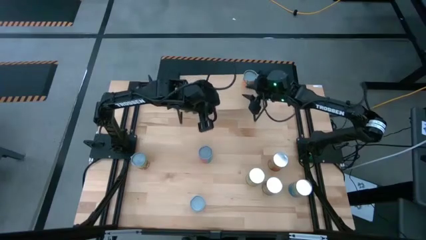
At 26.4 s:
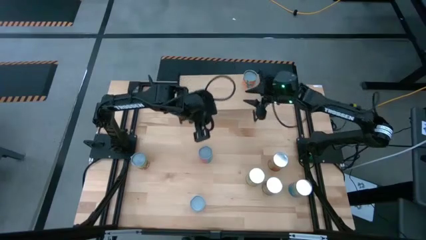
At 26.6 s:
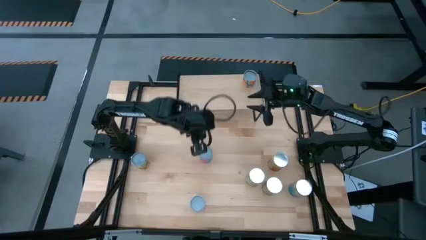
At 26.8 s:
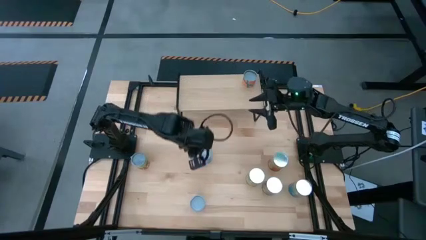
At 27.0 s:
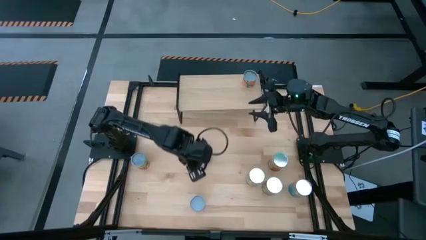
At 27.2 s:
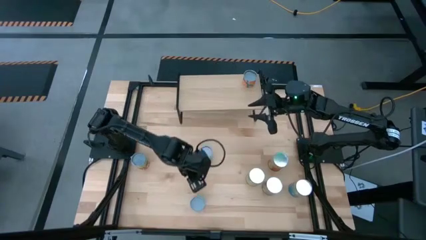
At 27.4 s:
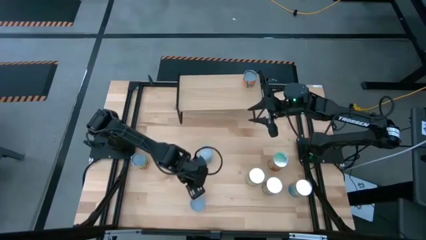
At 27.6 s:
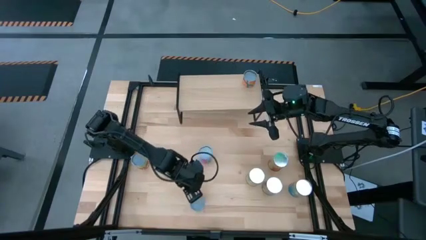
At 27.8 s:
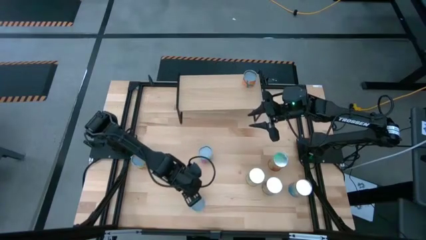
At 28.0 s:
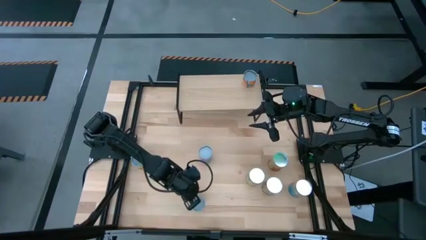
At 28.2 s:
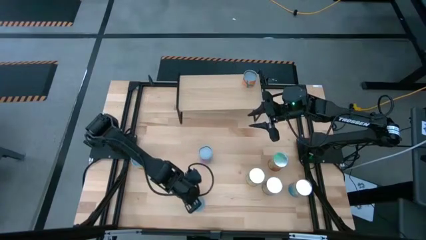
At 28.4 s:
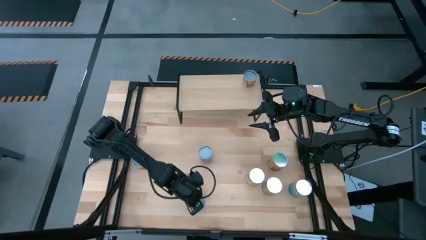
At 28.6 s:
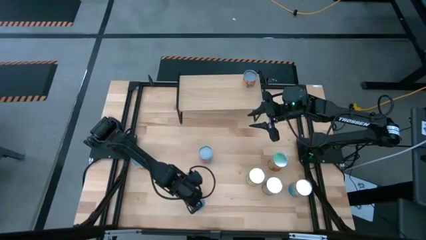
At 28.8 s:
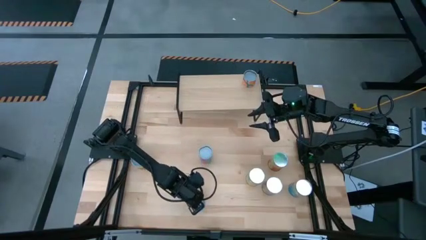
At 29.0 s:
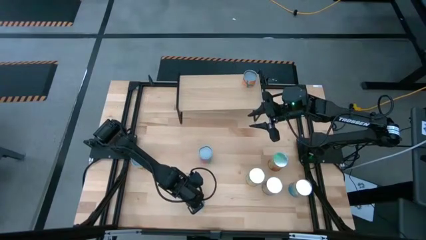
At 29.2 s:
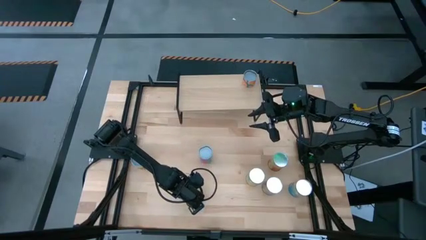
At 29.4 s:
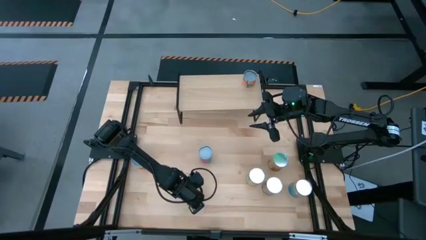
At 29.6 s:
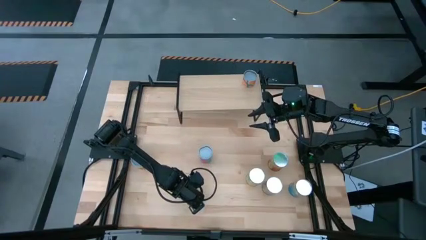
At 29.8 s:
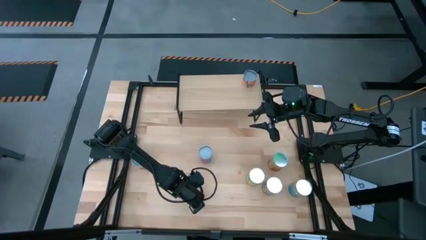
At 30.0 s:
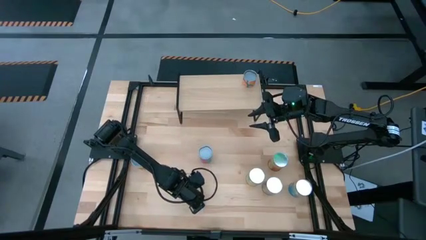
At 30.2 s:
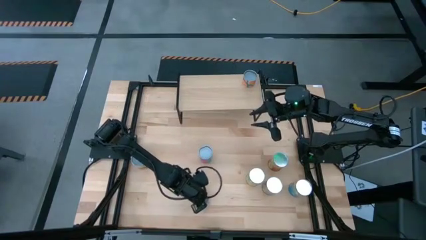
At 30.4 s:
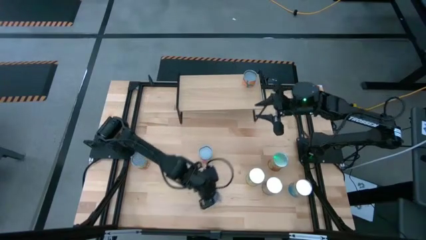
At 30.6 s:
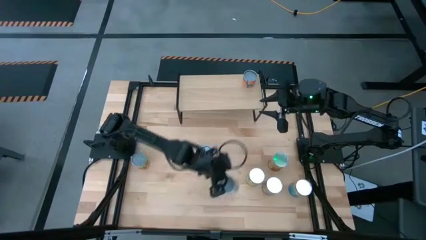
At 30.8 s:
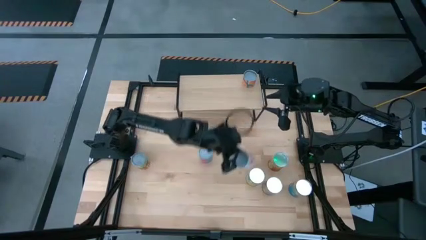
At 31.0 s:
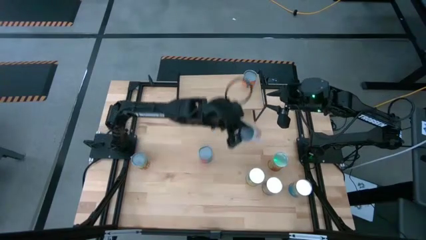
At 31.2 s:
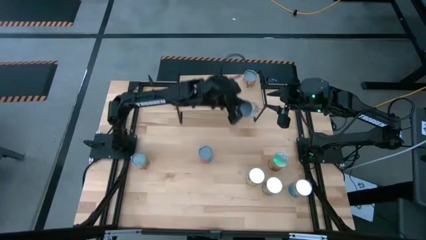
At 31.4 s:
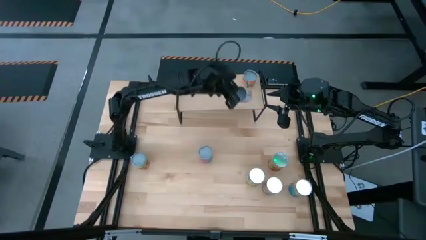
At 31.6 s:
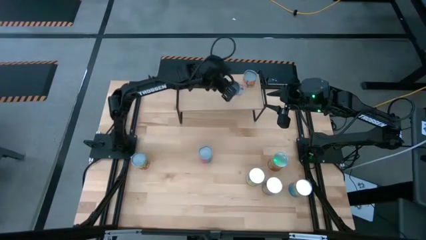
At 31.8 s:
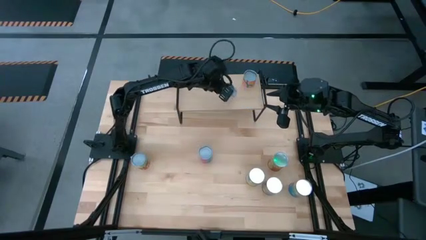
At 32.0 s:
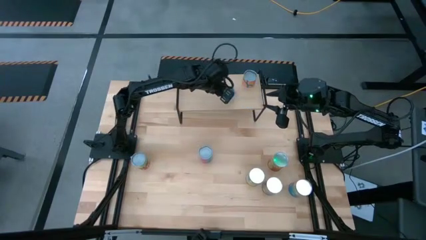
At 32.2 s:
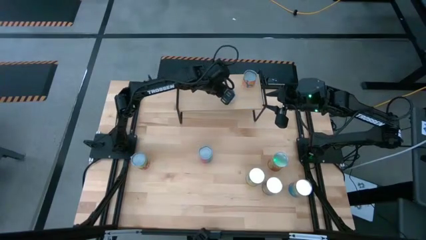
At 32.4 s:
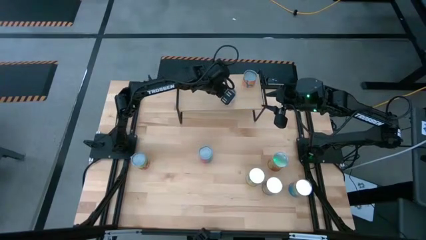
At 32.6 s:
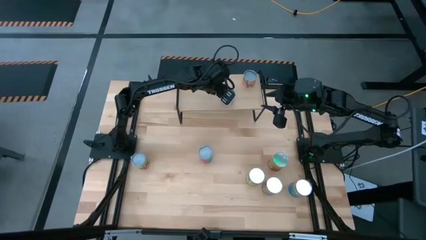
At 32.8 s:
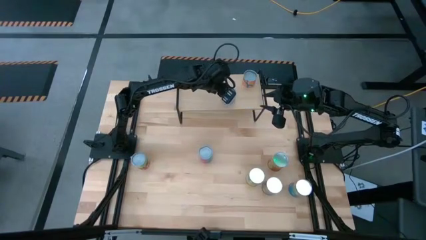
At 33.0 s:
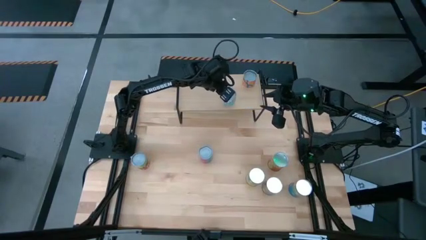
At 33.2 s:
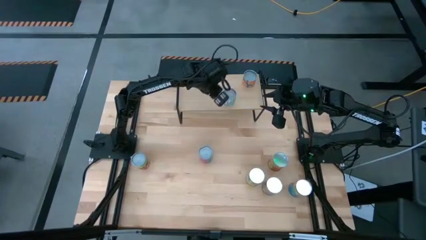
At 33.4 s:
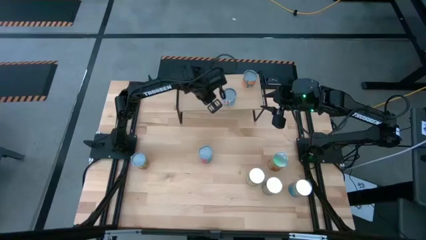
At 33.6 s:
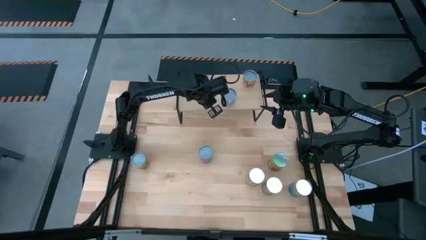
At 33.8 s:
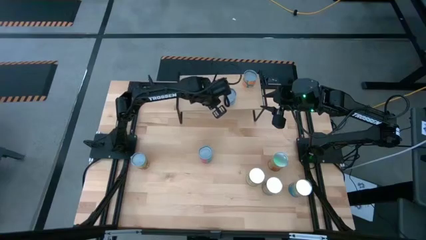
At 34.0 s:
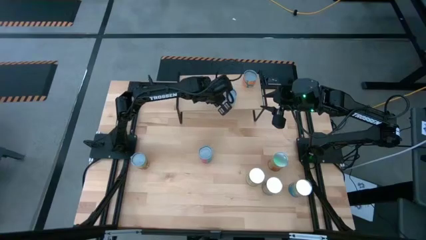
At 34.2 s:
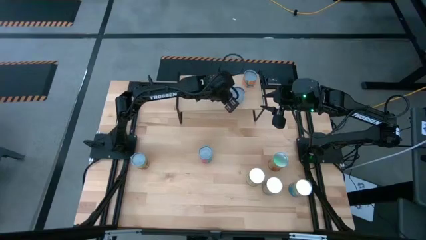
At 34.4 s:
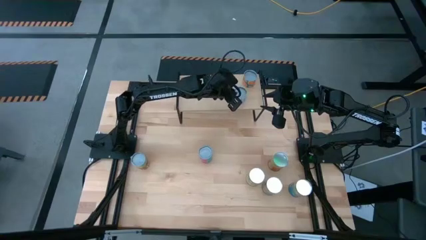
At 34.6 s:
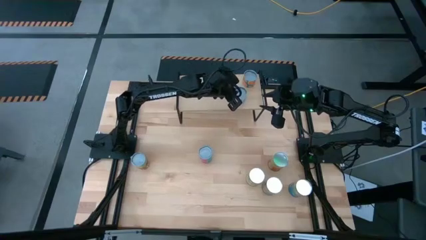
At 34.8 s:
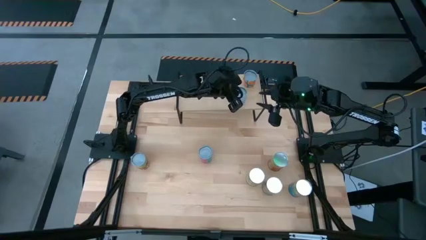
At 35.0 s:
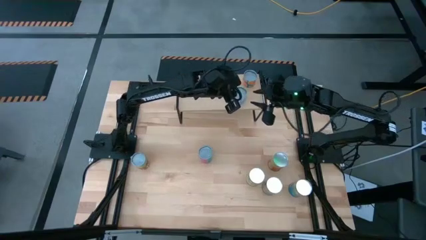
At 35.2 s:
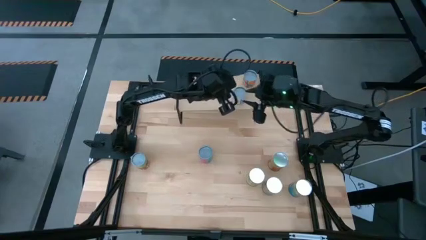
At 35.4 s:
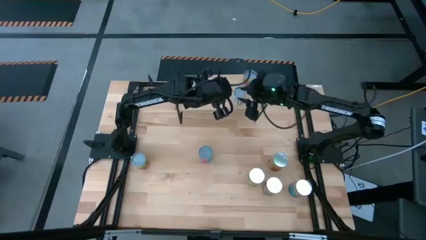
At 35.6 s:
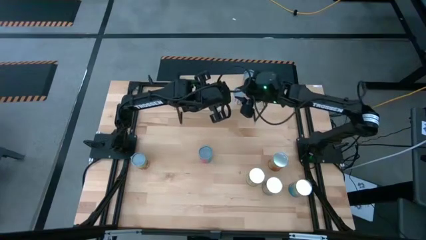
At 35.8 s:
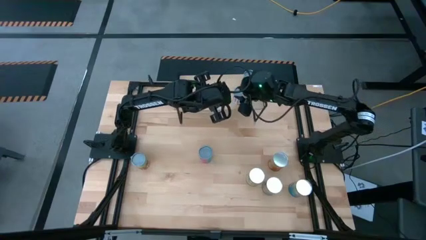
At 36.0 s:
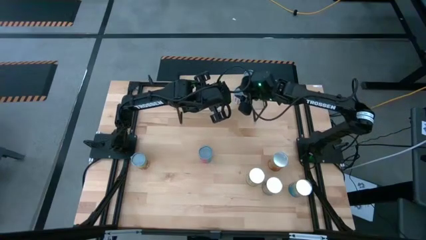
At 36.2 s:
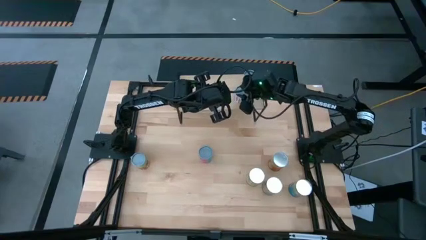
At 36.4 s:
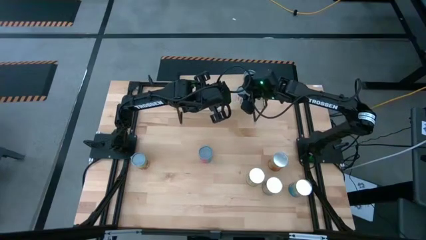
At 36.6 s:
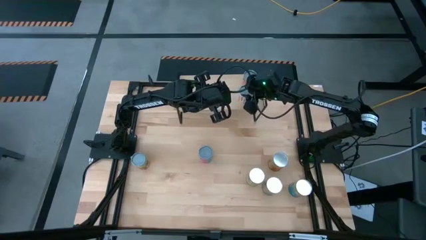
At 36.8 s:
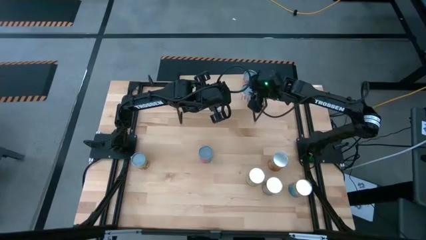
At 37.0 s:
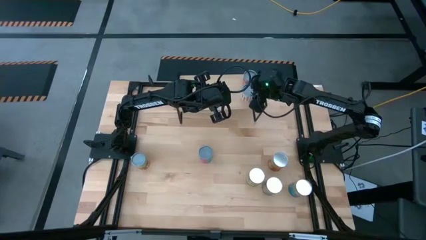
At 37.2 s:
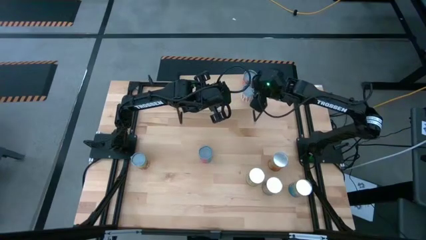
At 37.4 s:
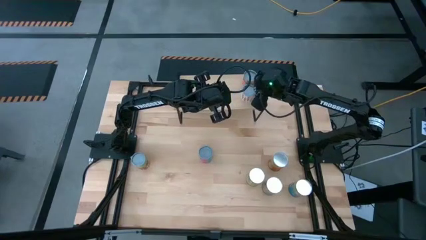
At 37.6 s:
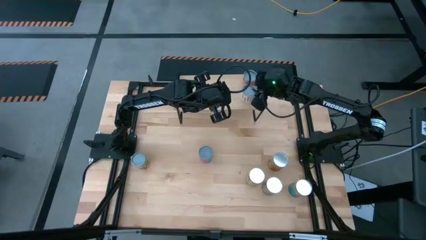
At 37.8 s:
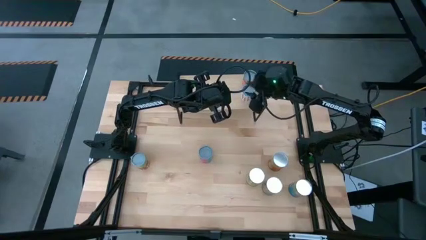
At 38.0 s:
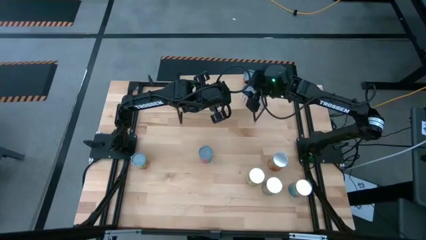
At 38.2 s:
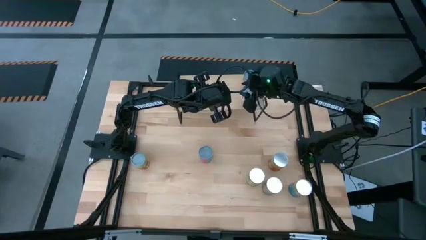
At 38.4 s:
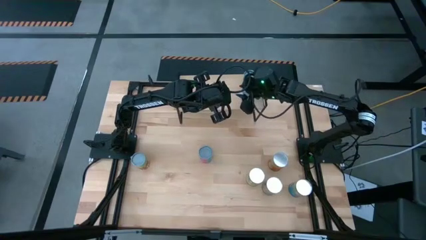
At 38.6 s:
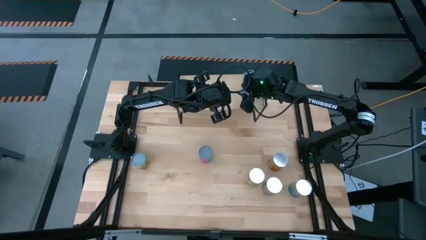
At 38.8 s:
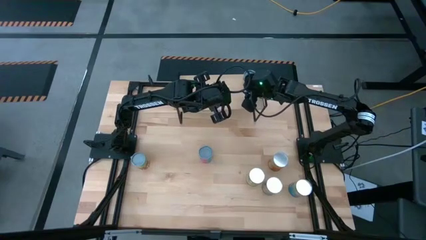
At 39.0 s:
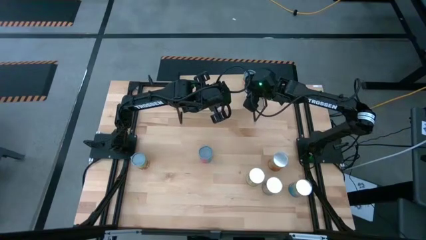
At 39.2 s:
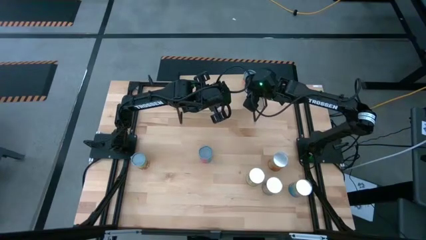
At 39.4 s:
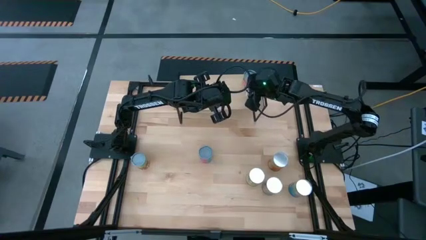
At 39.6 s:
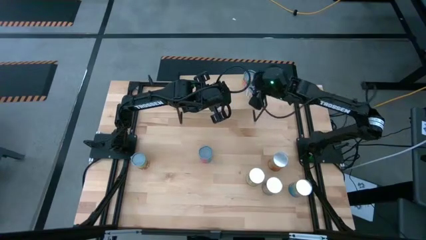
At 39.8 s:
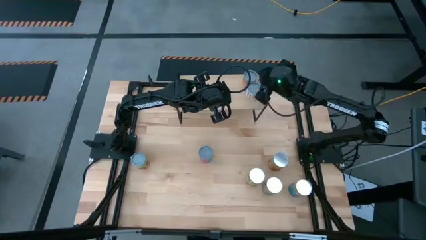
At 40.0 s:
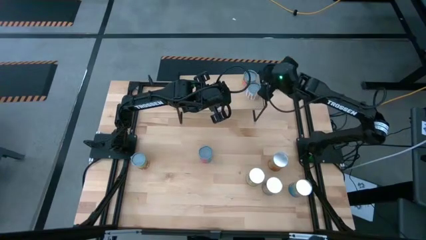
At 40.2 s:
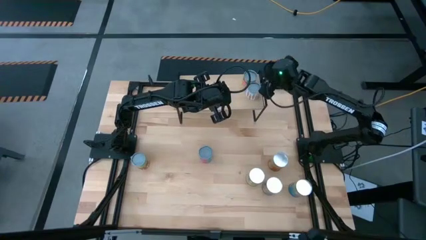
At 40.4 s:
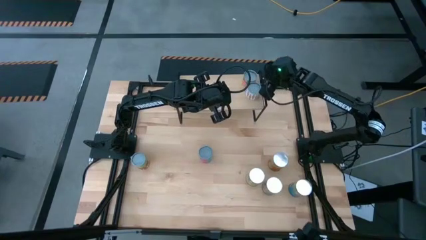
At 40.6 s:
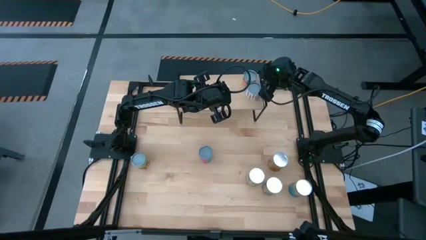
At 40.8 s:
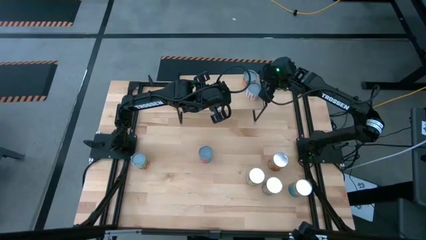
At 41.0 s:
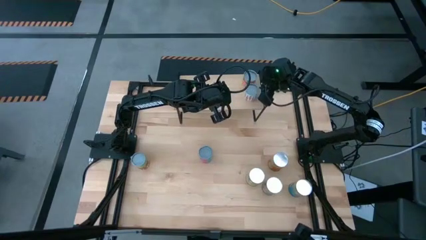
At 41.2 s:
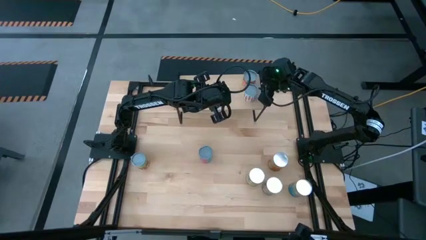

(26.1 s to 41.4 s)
Task: Pick and place cans onto a shelf
Put the canned carrots on the shelf
